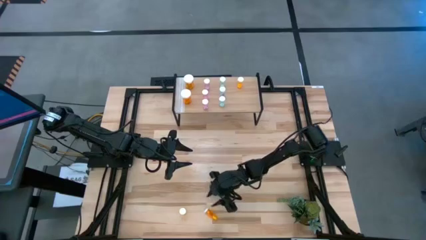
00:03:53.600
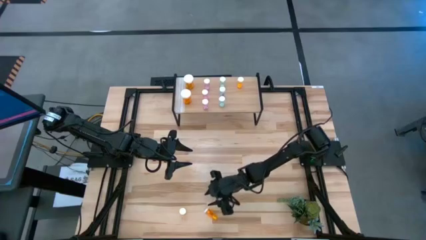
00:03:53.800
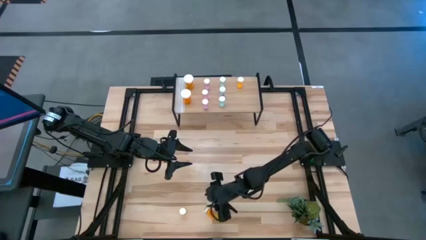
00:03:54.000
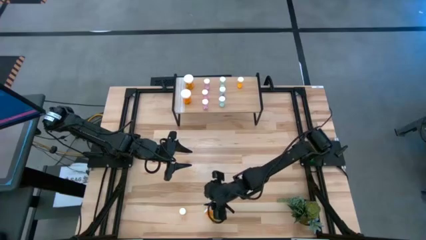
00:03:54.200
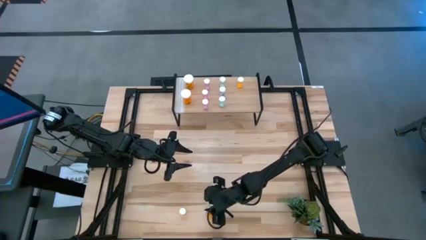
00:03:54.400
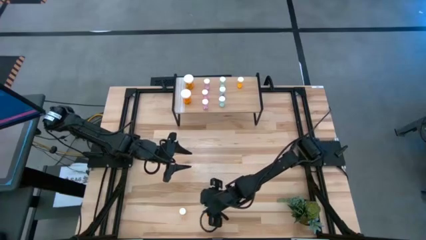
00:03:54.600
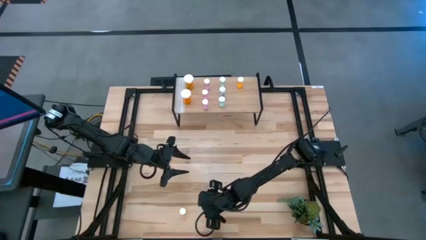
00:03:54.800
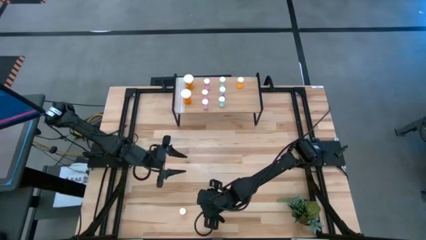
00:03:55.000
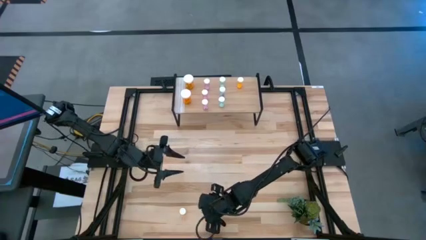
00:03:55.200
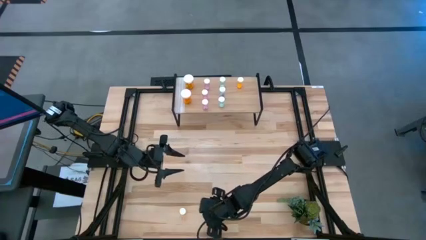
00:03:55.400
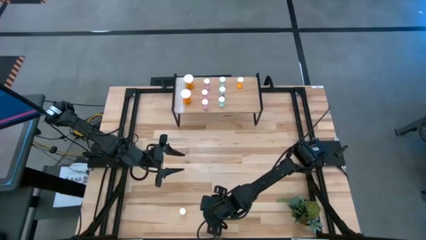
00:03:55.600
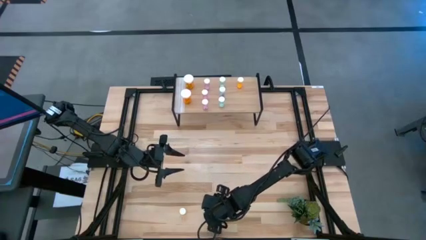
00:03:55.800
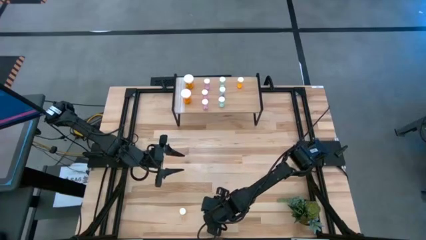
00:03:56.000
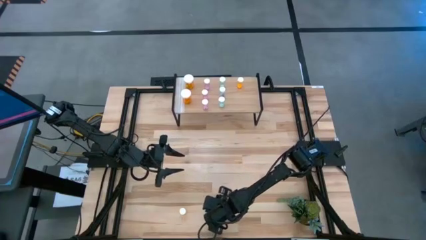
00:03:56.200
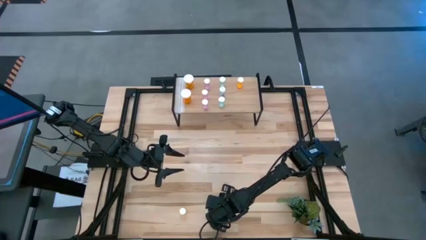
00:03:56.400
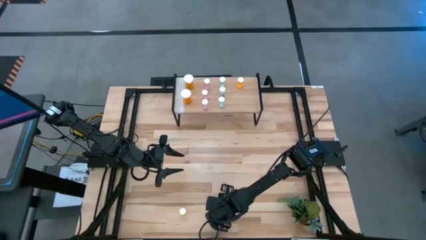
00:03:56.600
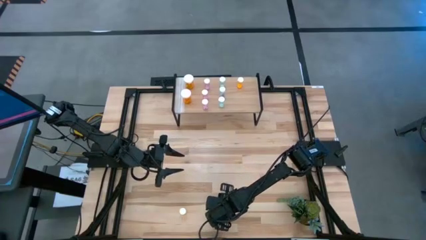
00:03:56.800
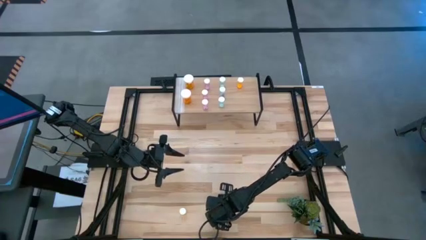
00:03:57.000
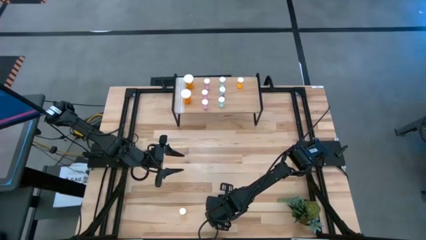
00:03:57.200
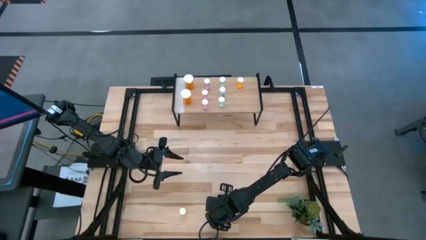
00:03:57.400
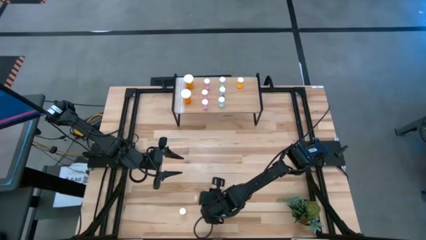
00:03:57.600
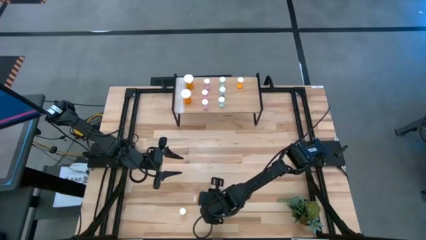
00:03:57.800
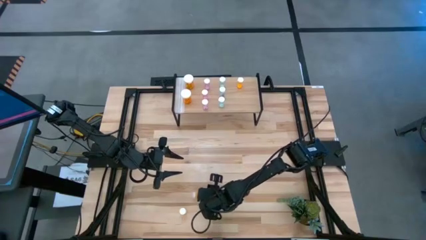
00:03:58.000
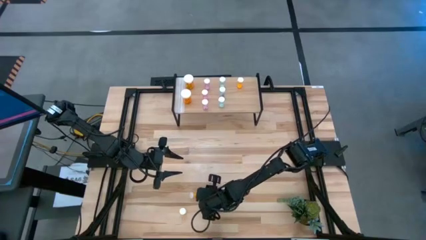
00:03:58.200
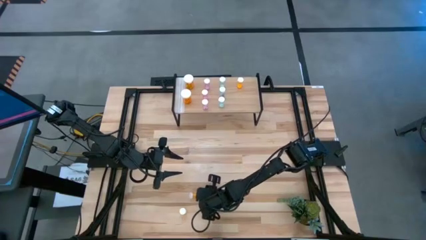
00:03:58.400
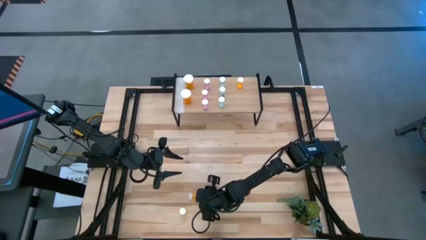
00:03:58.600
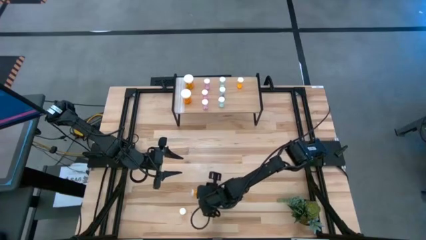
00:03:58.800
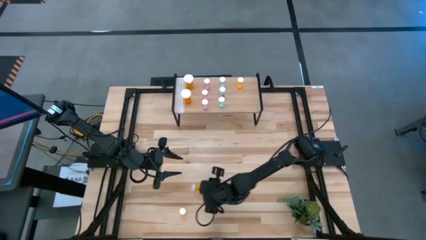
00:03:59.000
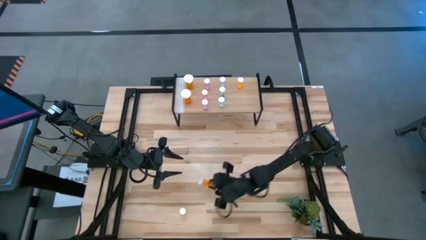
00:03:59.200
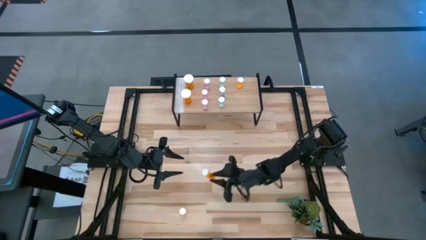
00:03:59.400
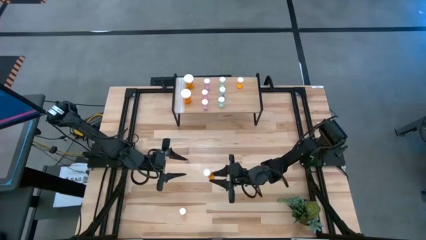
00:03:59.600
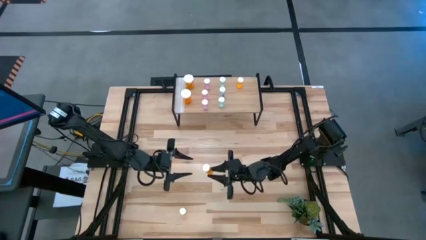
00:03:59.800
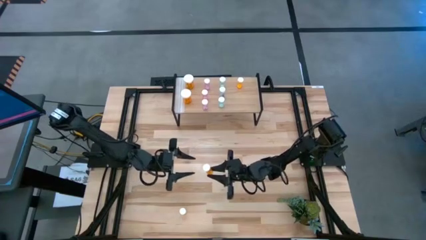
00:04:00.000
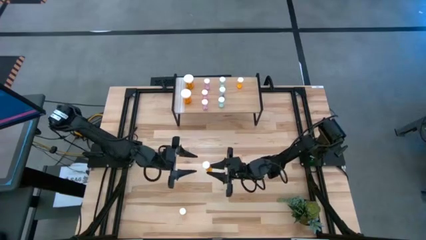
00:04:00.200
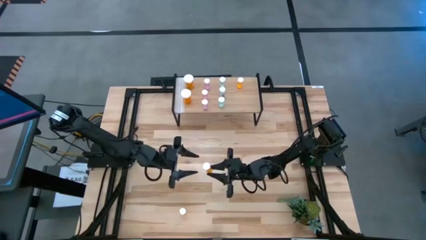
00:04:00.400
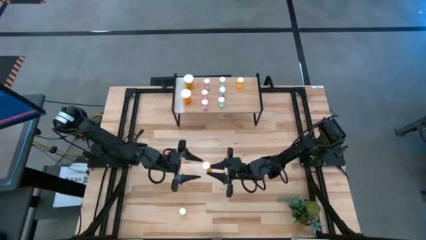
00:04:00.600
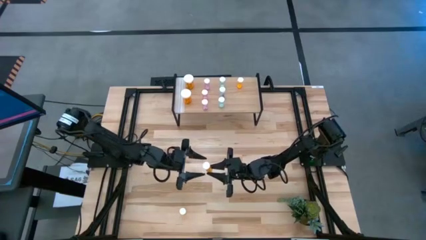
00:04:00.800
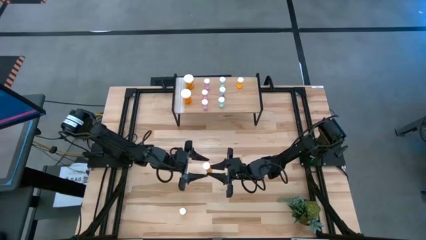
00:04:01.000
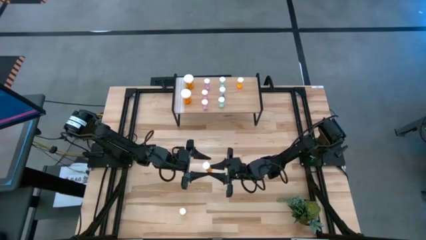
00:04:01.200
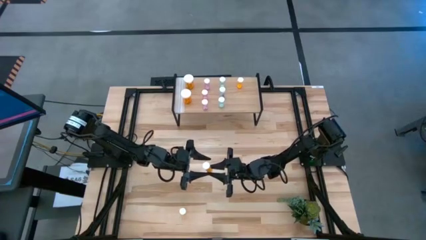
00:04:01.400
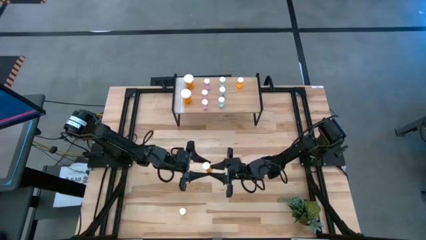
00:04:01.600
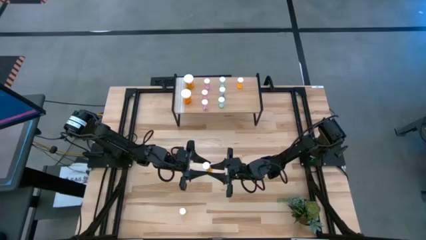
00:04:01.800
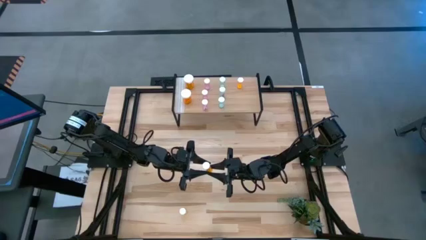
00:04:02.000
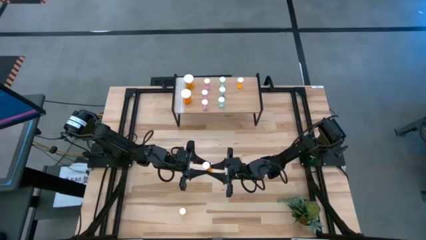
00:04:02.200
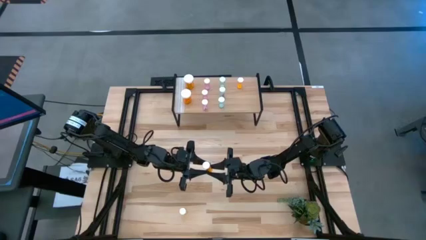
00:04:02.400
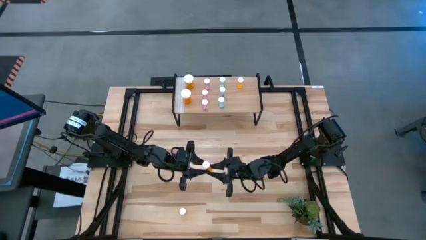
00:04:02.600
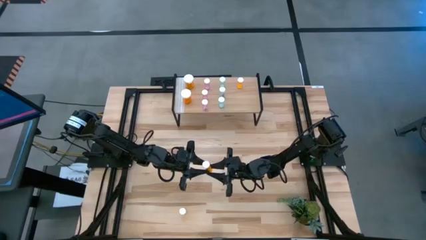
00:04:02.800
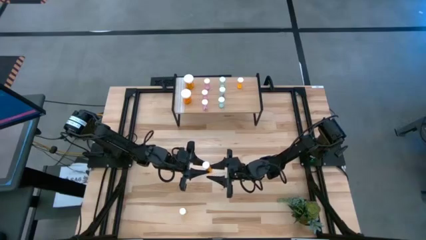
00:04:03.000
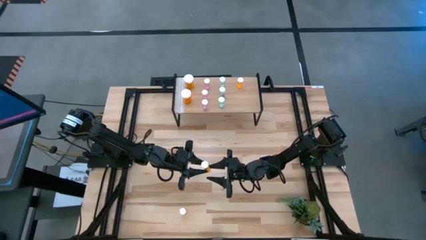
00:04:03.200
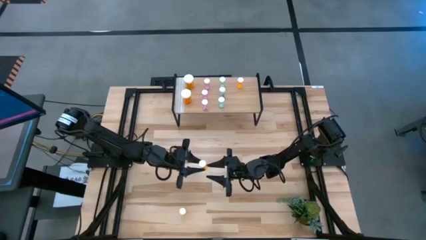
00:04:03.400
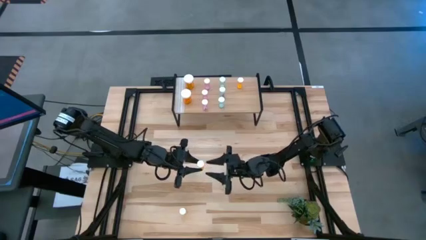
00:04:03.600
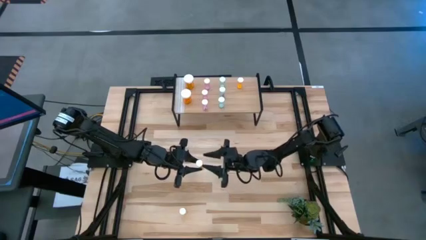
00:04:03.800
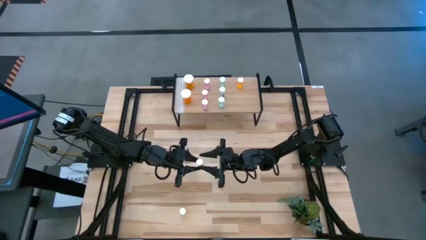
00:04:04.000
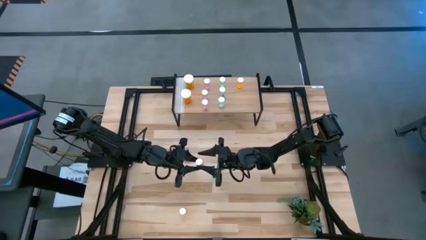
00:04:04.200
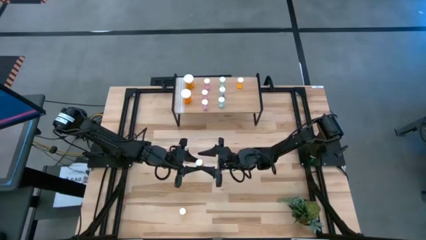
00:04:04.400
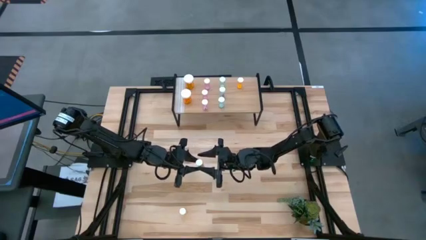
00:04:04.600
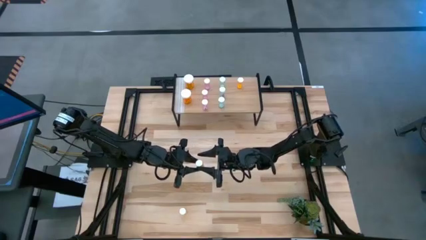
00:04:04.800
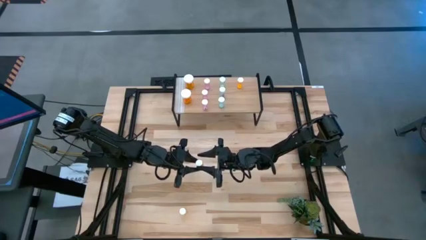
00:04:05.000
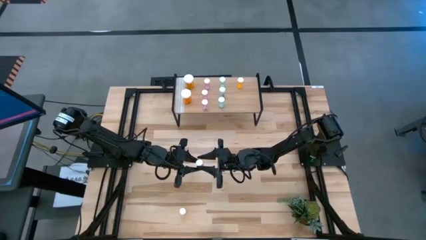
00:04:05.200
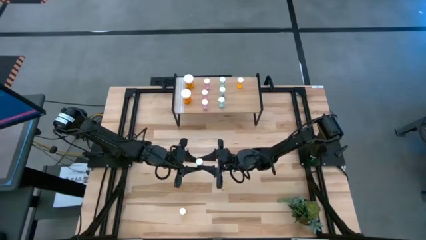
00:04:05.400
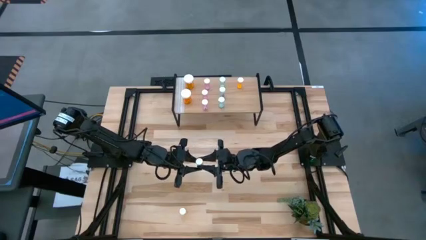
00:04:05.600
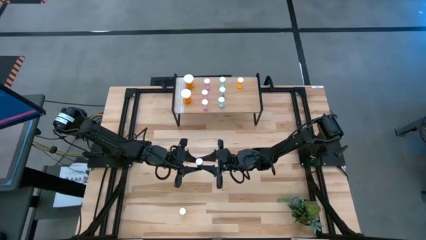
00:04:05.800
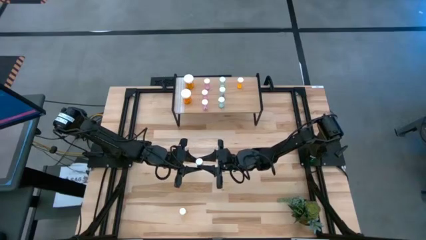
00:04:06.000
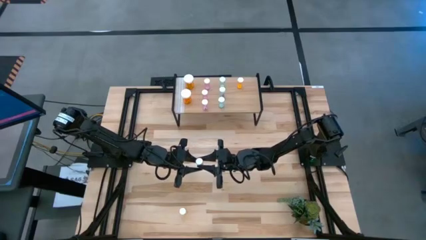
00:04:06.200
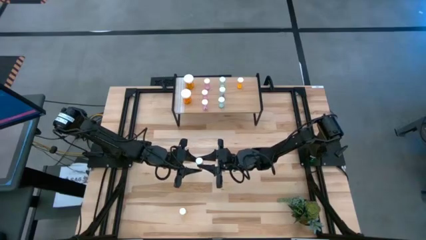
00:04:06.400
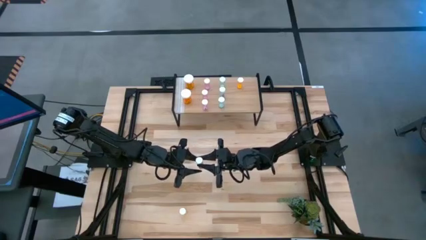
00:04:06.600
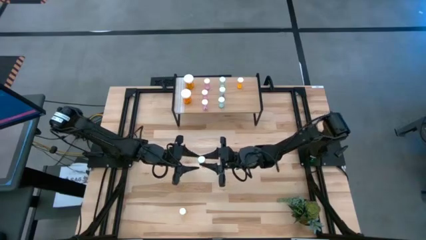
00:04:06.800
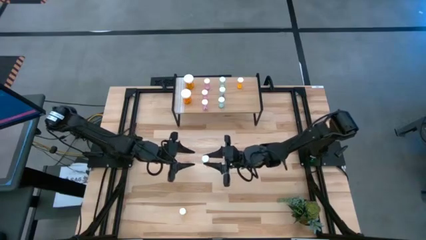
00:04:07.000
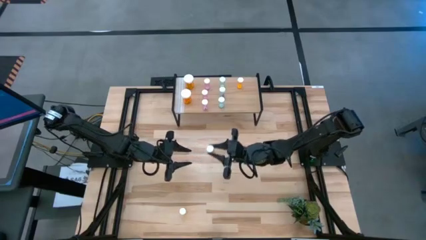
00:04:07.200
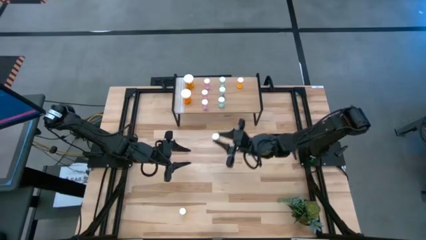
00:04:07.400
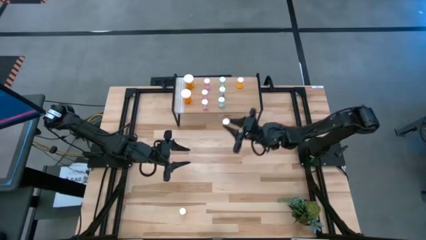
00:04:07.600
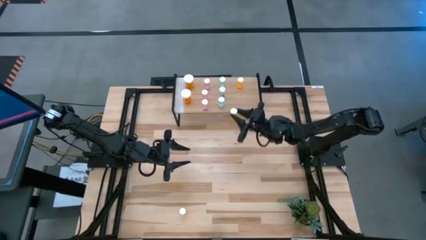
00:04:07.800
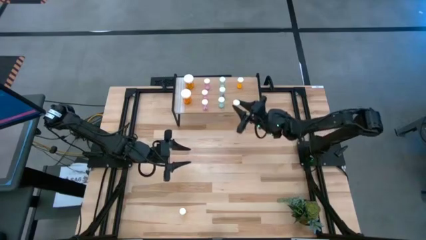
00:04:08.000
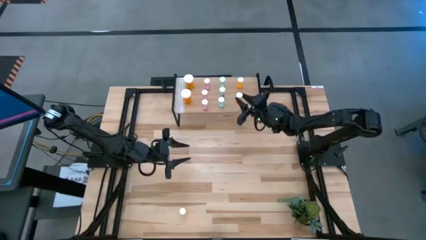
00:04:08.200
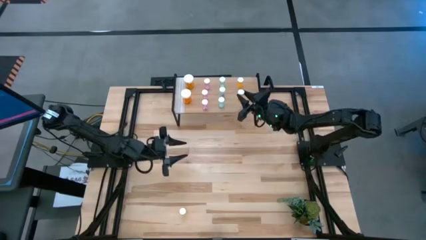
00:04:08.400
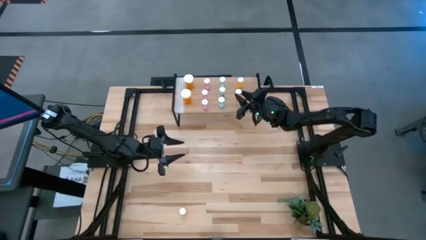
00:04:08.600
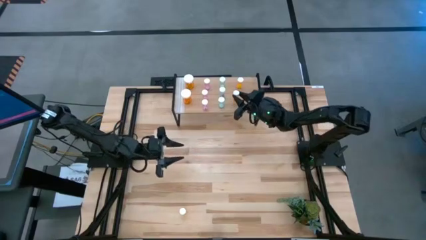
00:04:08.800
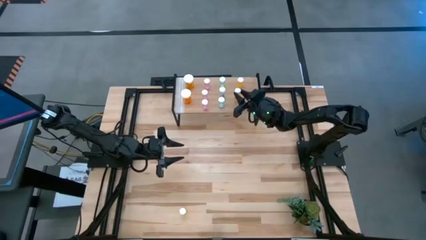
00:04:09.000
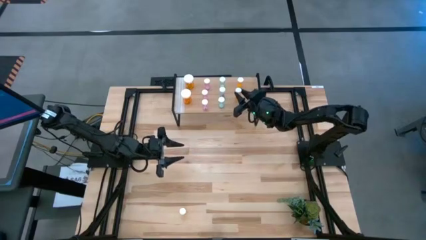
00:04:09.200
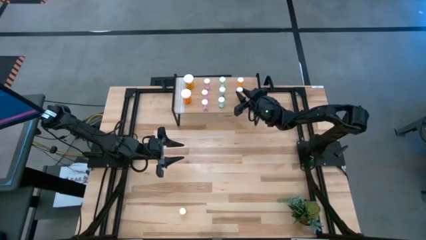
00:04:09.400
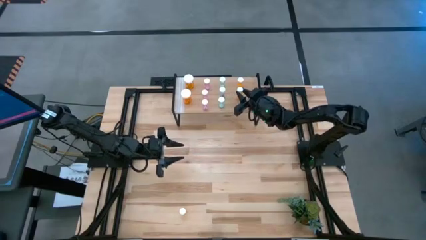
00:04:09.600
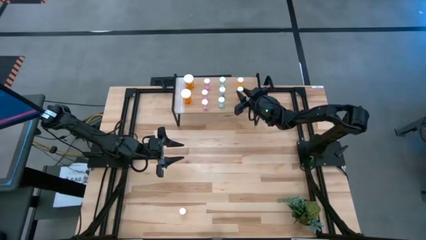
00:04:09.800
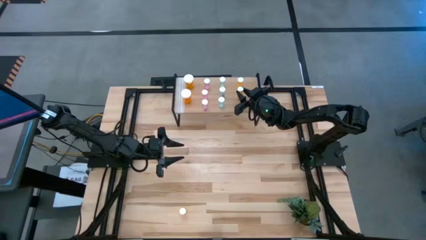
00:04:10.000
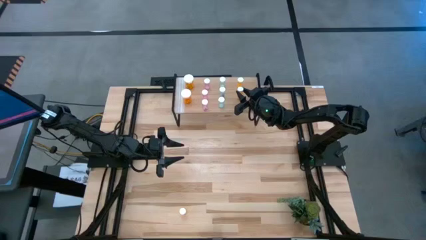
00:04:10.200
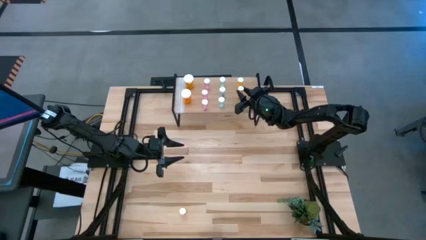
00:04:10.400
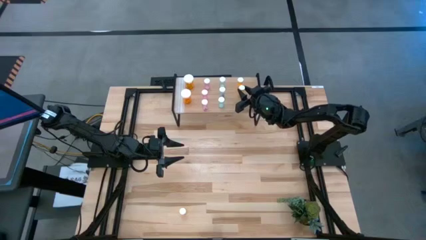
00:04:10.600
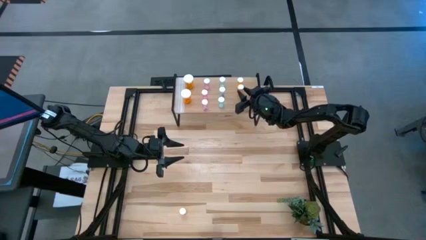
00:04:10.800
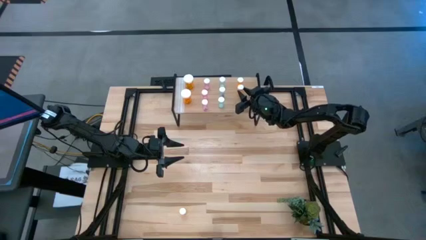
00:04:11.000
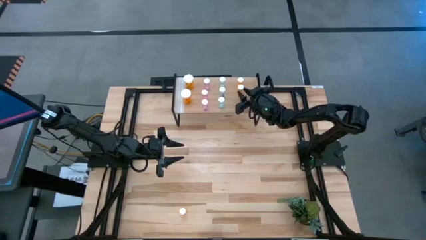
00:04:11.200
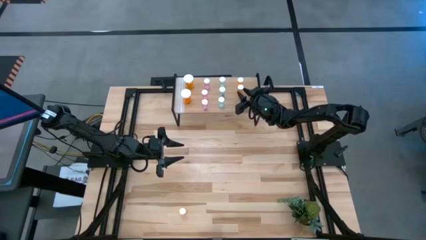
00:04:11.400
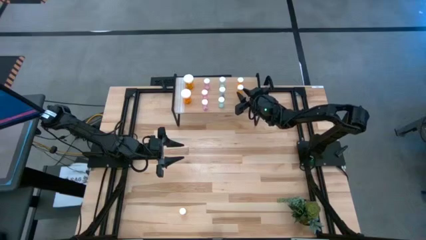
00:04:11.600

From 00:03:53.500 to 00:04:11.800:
Task: Pick and place medicine bottles onto shelf by color
Put the right small orange pill bottle aligned with the other small orange pill bottle on the shelf
